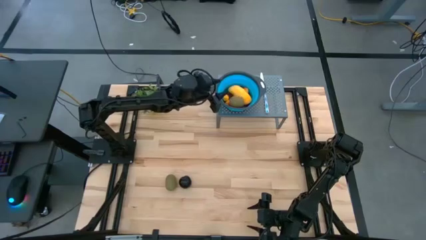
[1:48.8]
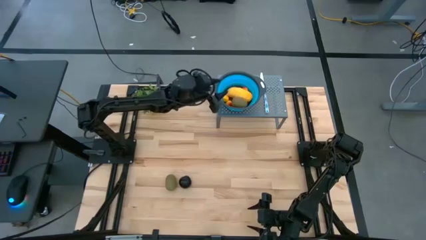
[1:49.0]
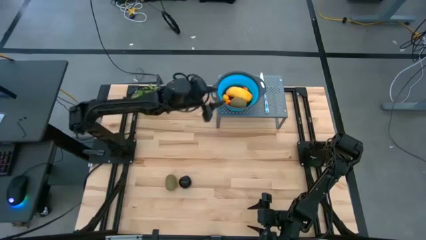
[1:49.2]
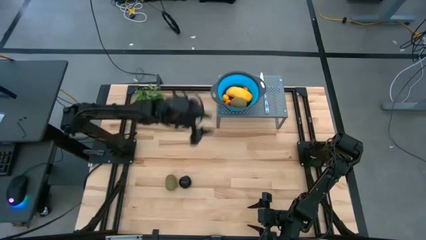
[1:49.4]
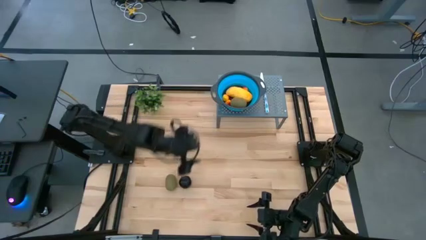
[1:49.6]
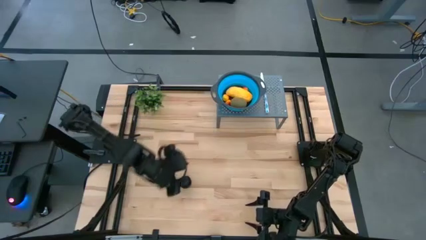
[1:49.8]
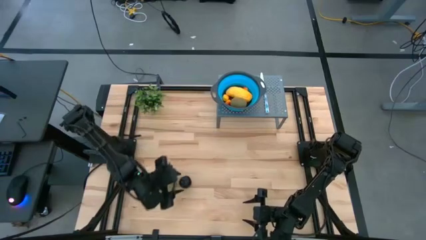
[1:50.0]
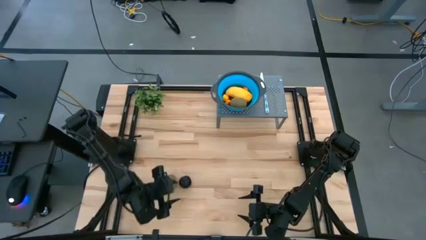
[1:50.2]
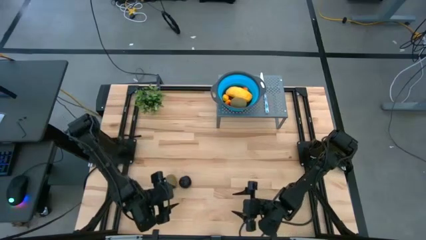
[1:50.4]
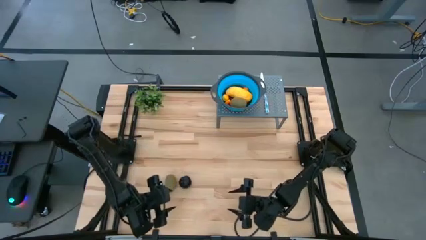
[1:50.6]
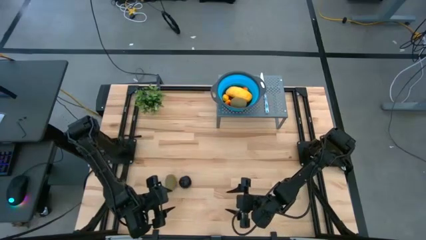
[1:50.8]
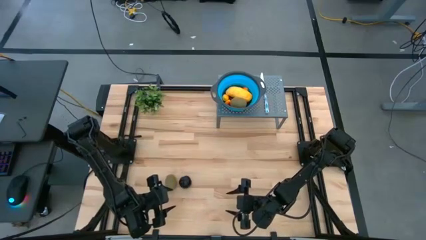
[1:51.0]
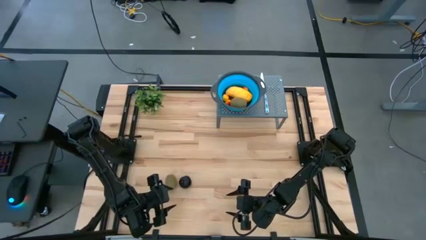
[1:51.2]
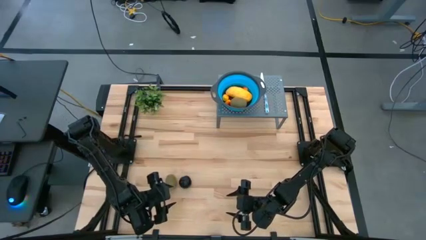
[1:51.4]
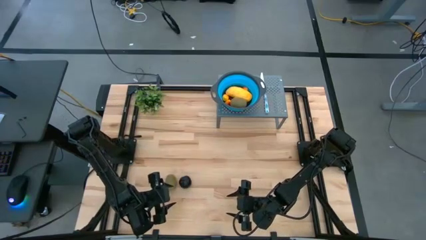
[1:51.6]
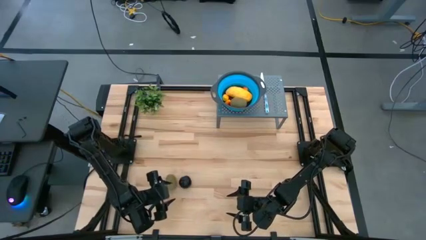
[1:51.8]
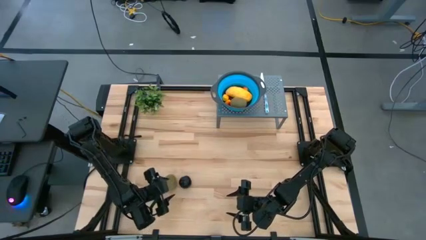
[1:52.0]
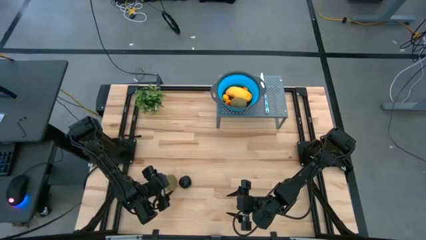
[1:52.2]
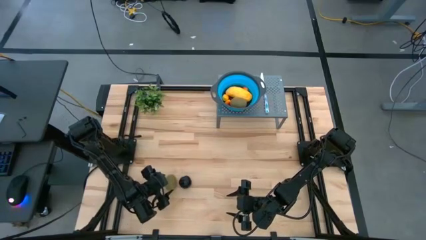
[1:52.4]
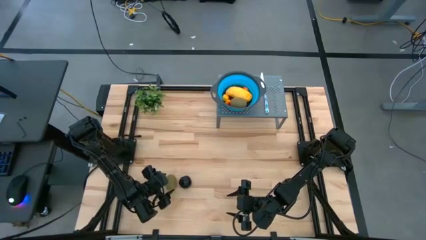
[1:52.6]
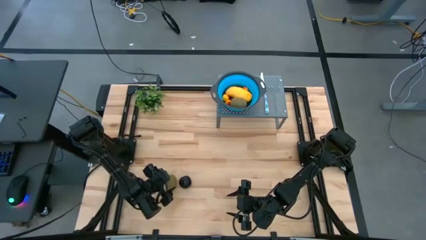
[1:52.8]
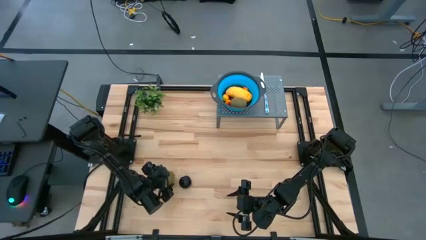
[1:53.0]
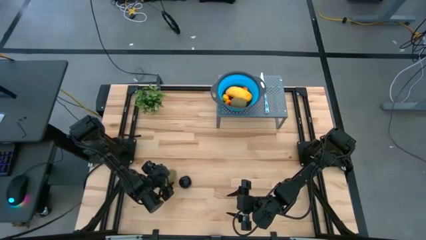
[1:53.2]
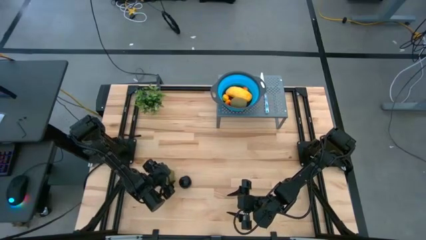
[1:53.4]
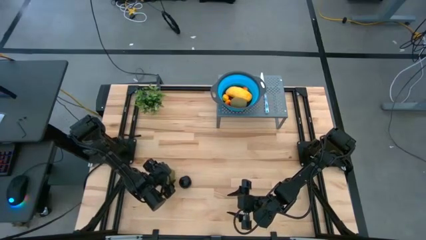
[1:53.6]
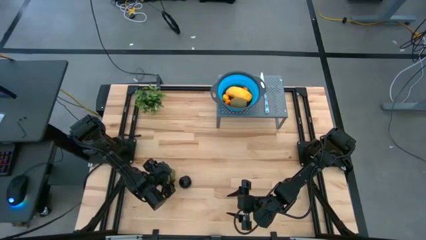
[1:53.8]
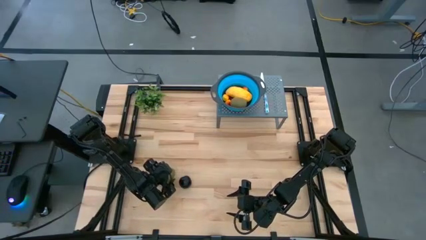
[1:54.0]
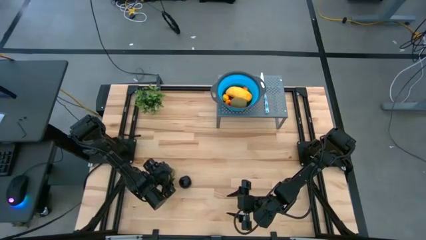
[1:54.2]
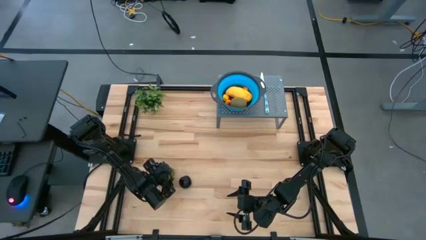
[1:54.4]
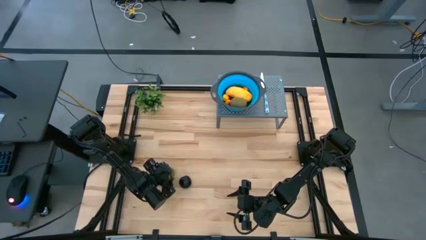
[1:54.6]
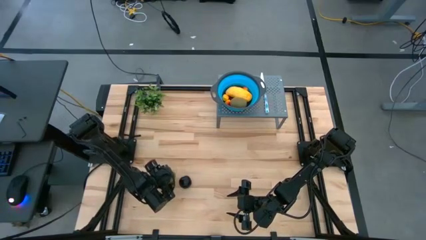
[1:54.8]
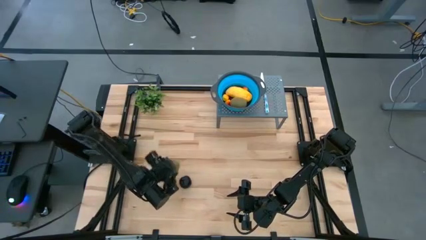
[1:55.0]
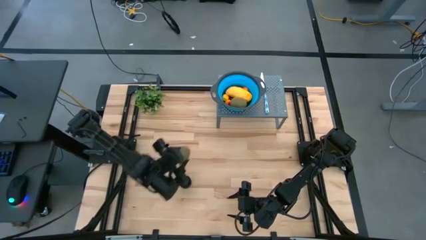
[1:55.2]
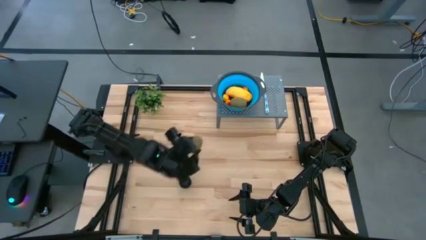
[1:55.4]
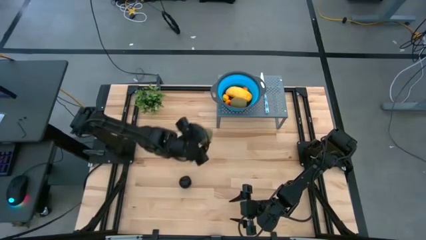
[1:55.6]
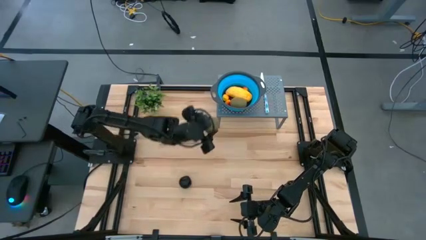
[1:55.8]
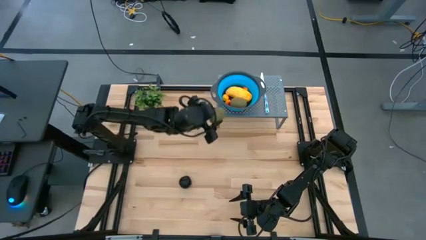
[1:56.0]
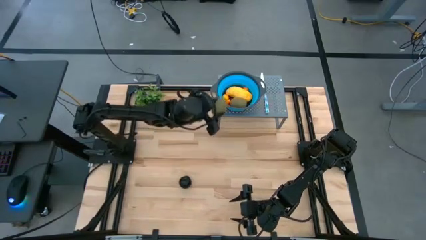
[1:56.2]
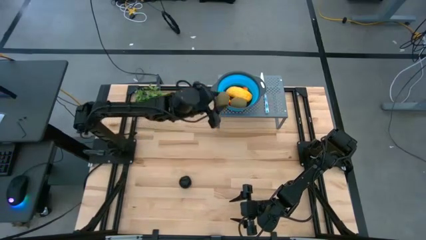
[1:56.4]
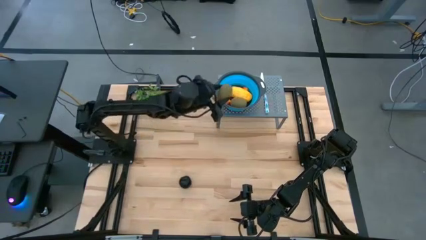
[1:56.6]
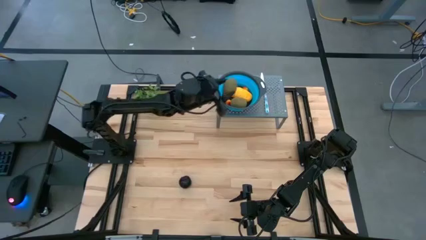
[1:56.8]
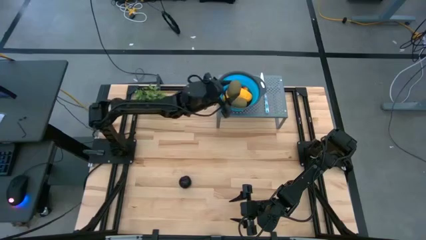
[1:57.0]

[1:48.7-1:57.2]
Task: Pick & Place Fruit
Put the brown kiwi into the blue strainer bowl

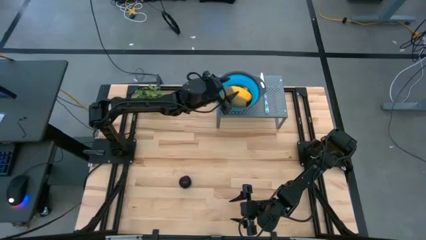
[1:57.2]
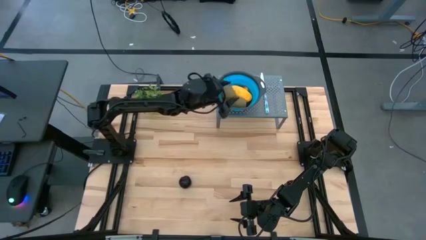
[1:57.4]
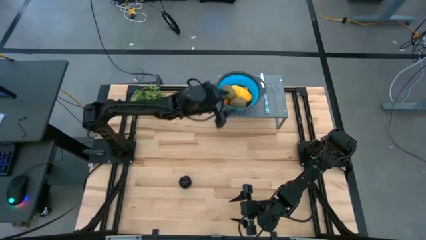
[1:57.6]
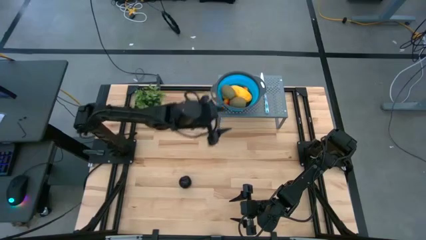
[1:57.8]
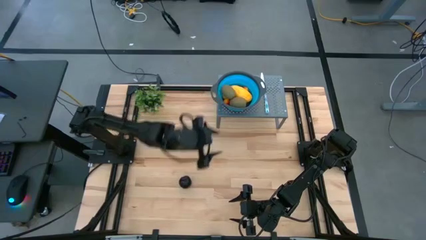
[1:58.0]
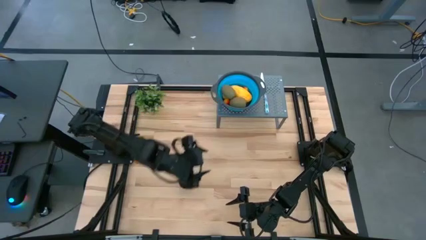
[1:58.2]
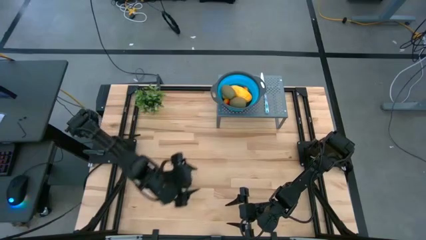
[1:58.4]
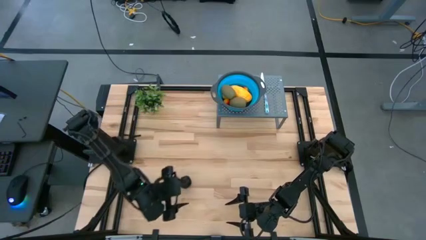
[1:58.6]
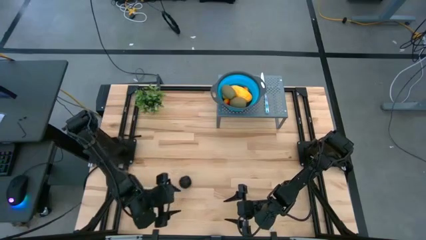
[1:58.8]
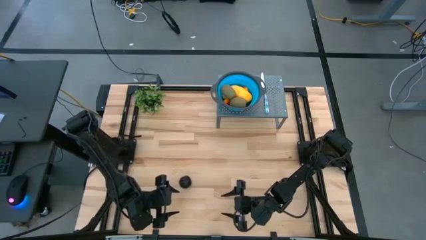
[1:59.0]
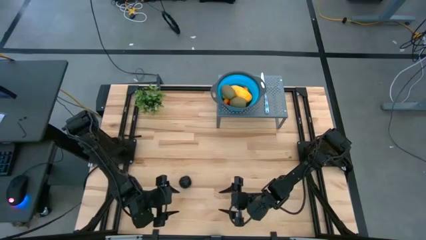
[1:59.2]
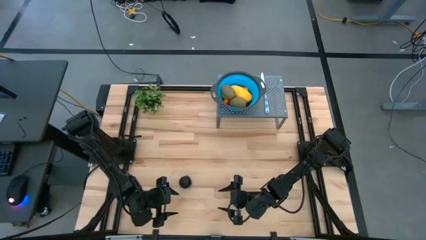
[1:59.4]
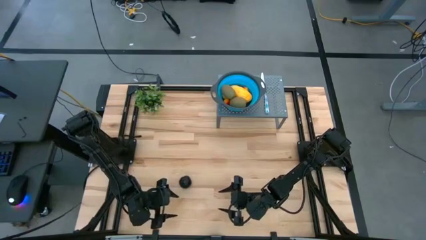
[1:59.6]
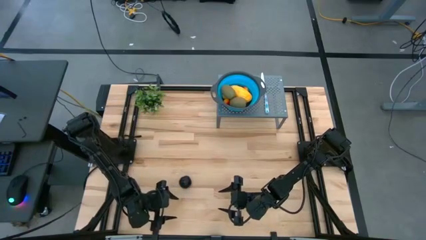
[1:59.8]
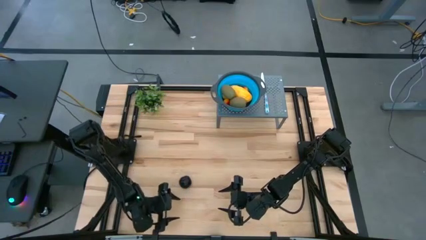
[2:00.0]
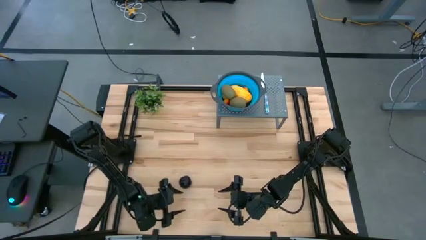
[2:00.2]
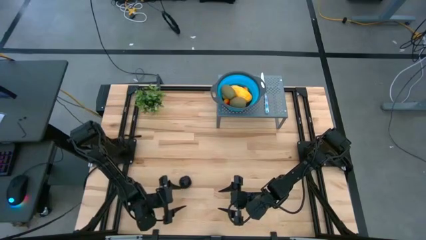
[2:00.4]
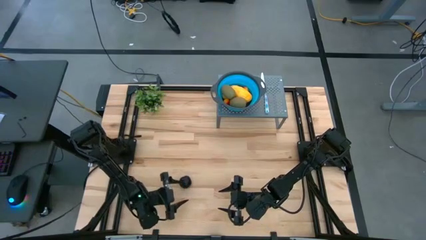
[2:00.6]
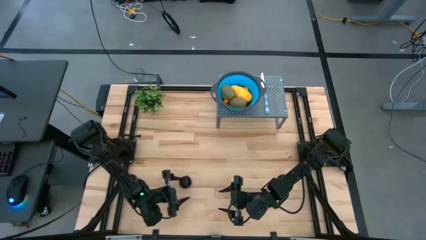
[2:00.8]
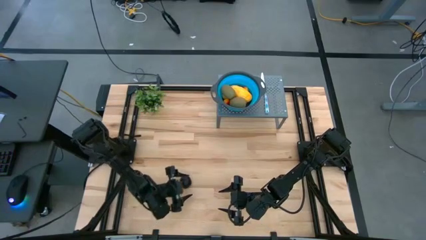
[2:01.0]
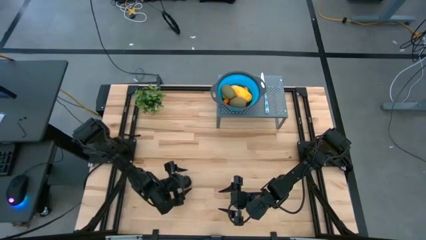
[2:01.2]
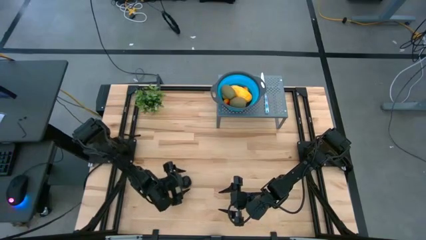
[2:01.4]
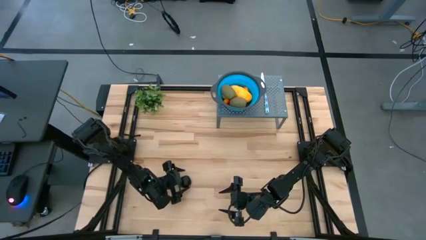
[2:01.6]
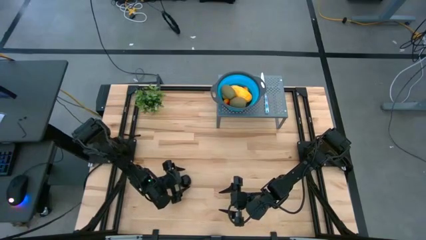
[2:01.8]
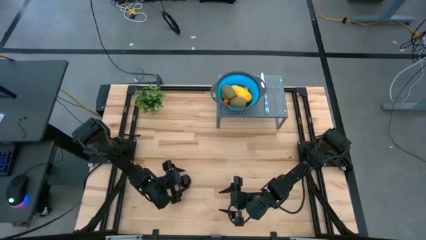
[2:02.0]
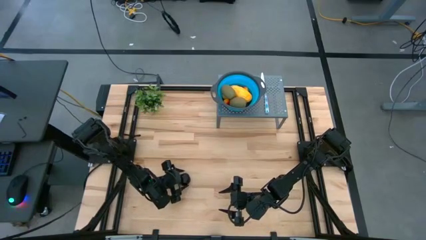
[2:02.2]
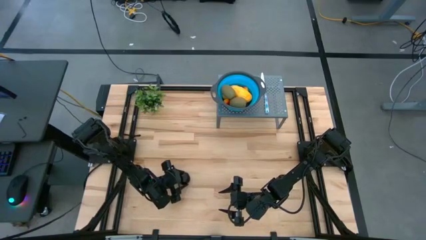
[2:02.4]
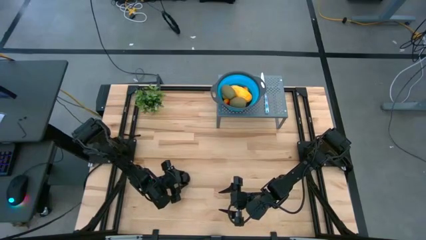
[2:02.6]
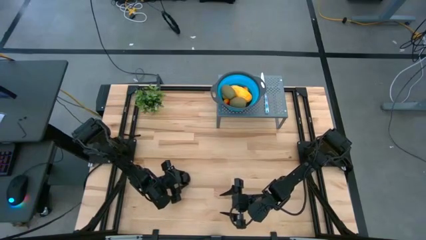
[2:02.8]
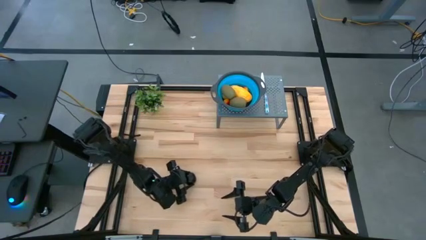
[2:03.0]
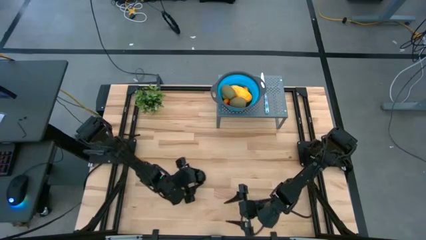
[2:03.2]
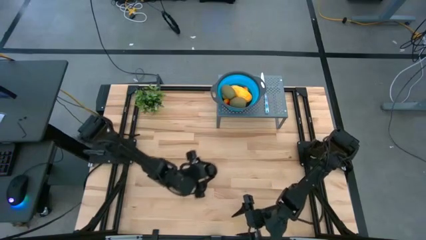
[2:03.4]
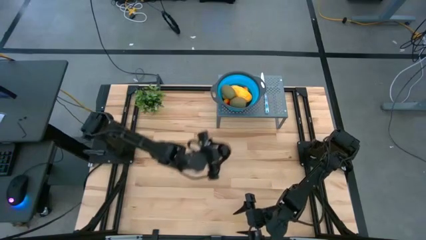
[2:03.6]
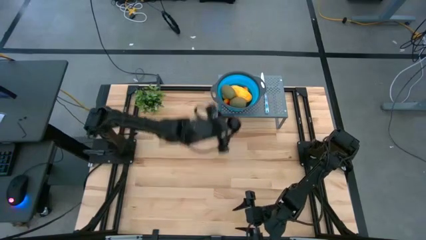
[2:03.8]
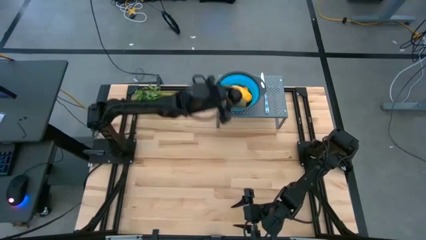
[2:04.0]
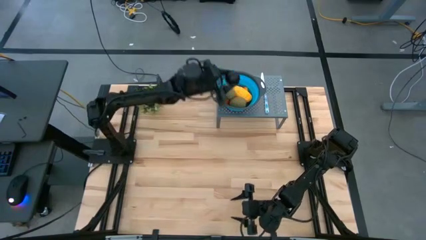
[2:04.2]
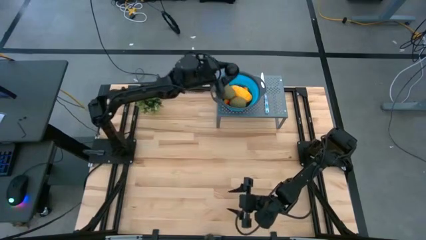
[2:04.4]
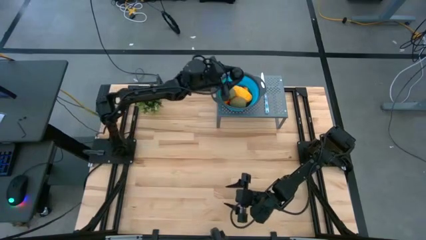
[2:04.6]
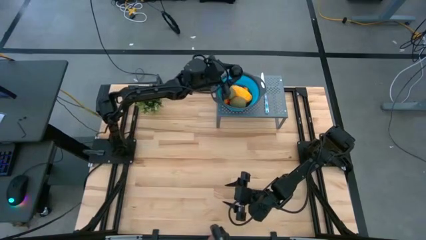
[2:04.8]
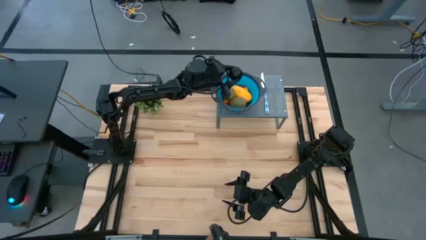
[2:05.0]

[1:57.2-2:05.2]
Put the black plum into the blue strainer bowl
